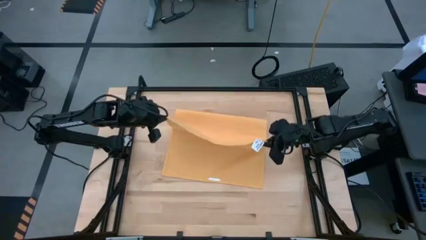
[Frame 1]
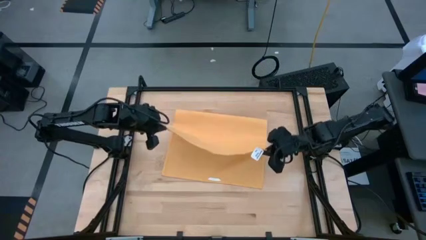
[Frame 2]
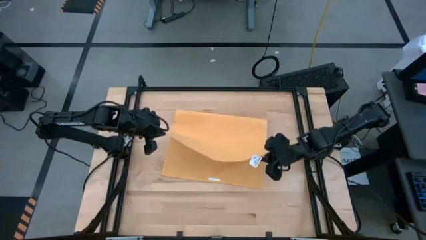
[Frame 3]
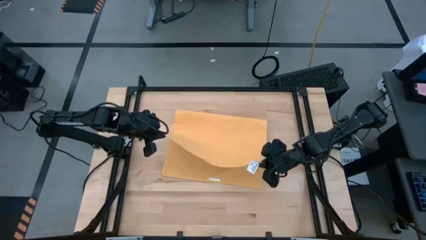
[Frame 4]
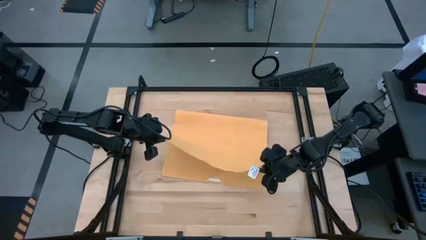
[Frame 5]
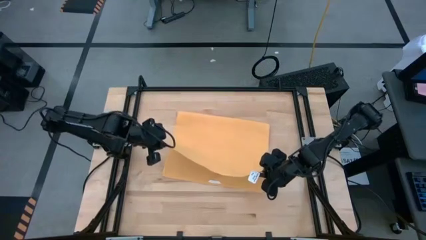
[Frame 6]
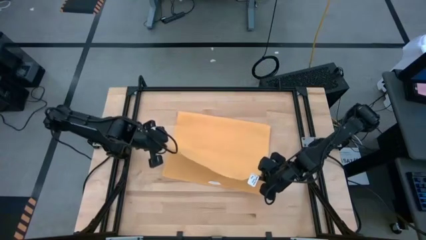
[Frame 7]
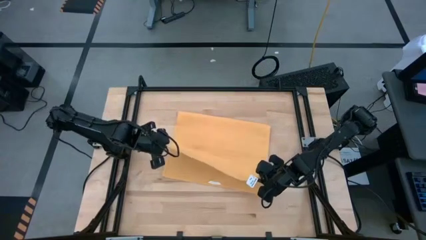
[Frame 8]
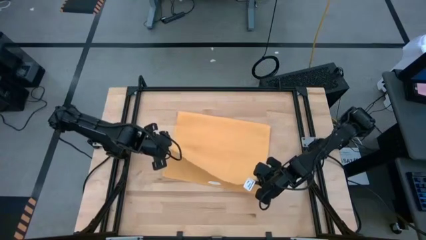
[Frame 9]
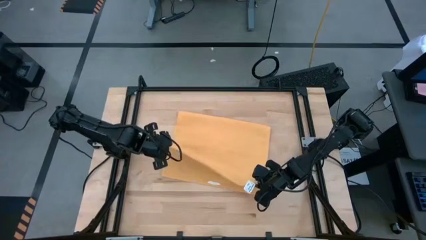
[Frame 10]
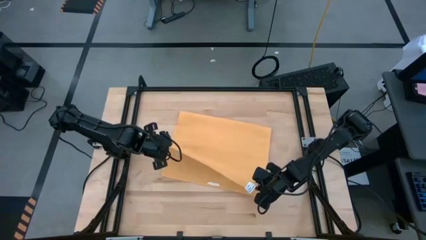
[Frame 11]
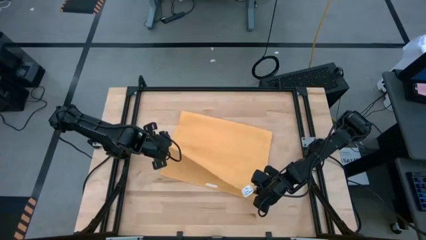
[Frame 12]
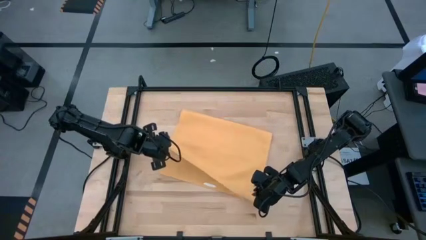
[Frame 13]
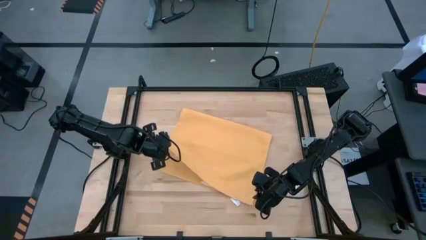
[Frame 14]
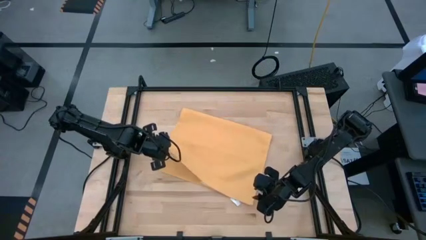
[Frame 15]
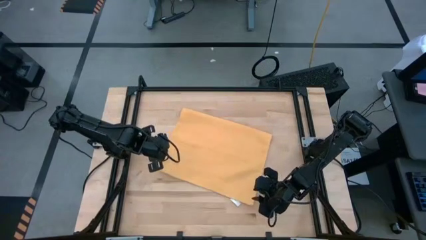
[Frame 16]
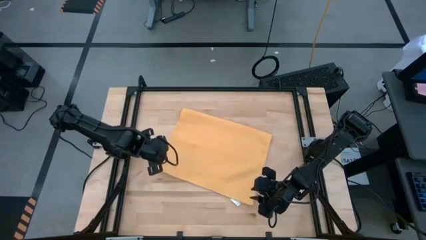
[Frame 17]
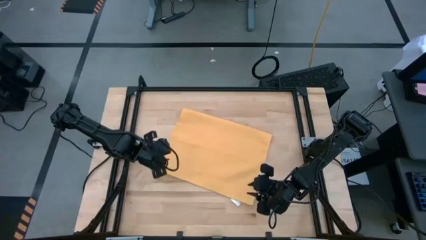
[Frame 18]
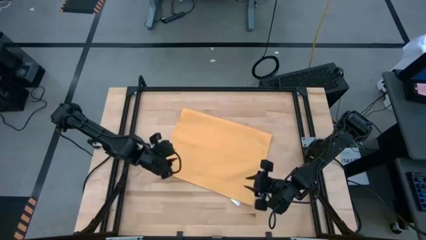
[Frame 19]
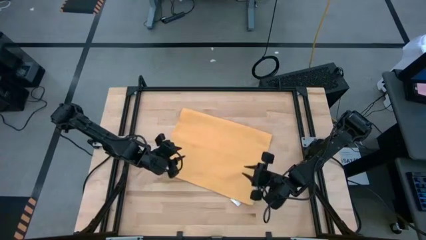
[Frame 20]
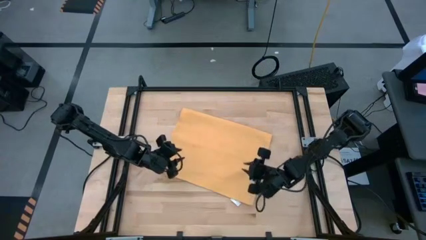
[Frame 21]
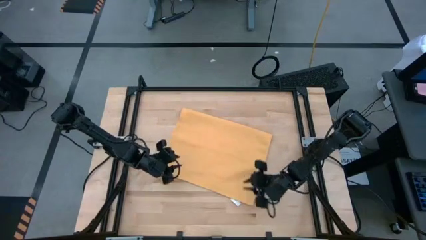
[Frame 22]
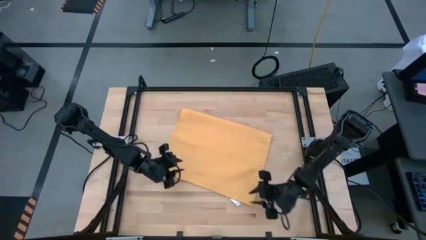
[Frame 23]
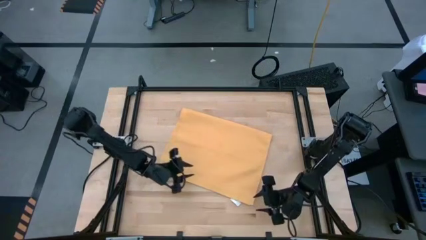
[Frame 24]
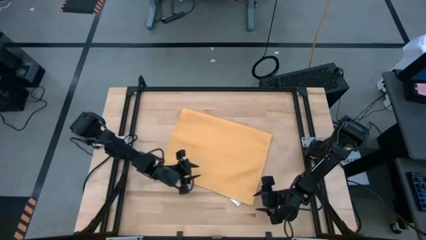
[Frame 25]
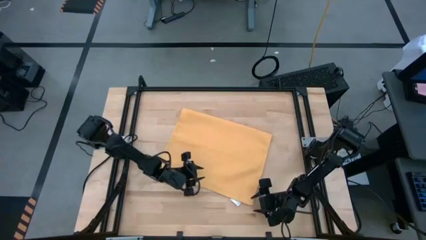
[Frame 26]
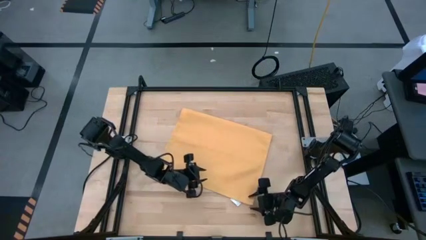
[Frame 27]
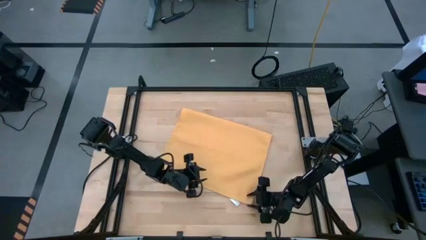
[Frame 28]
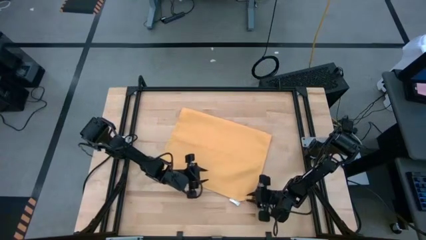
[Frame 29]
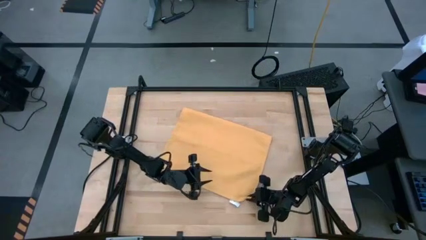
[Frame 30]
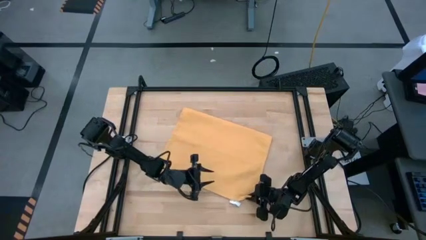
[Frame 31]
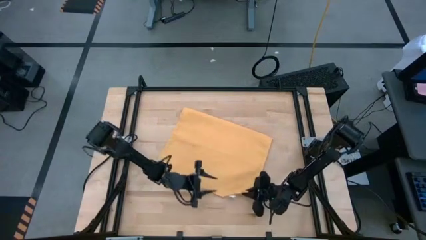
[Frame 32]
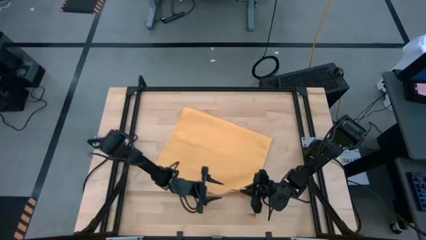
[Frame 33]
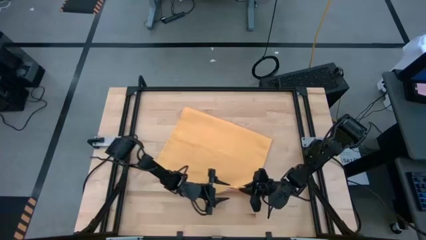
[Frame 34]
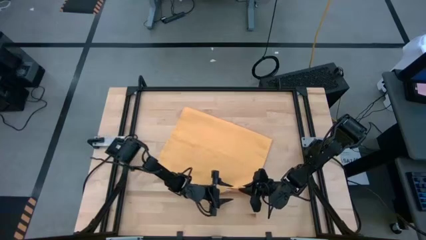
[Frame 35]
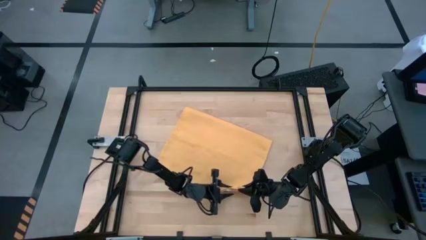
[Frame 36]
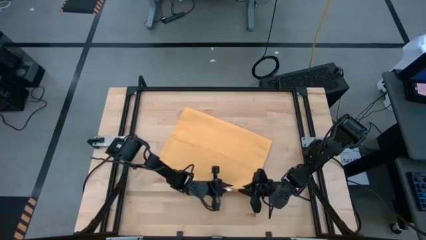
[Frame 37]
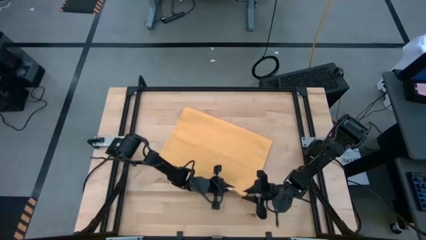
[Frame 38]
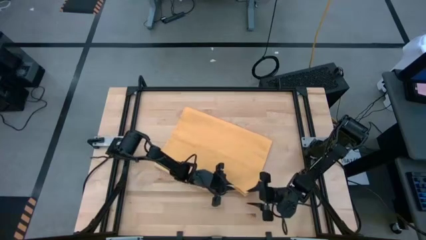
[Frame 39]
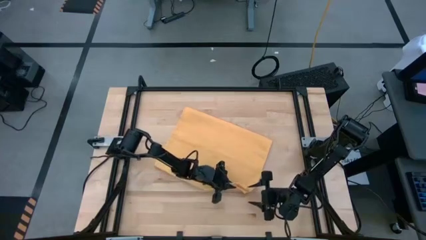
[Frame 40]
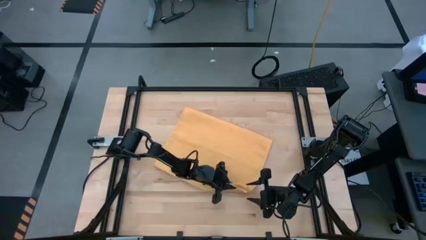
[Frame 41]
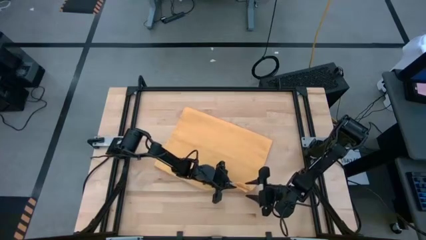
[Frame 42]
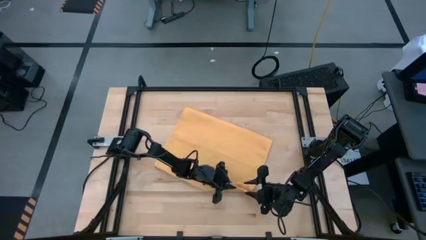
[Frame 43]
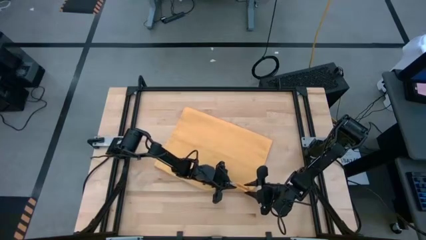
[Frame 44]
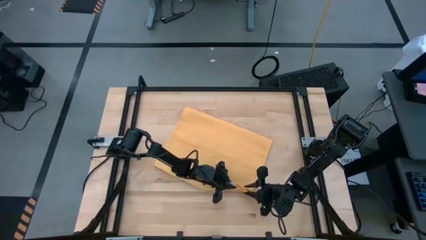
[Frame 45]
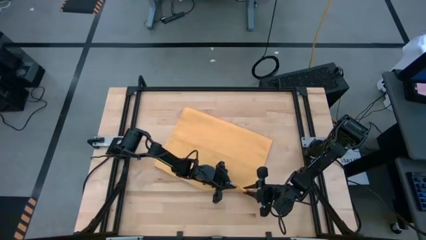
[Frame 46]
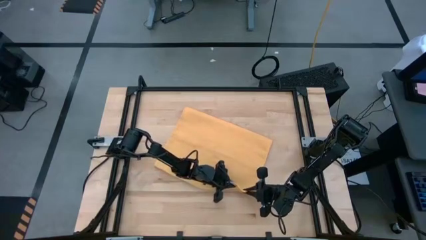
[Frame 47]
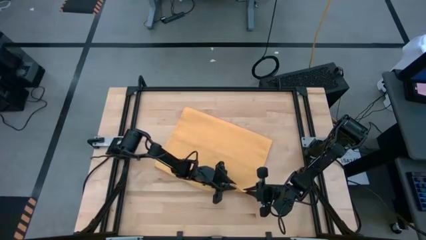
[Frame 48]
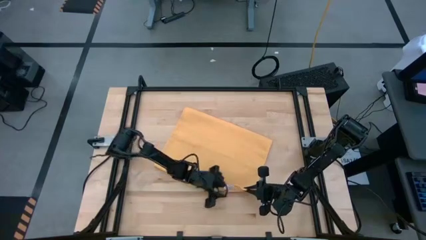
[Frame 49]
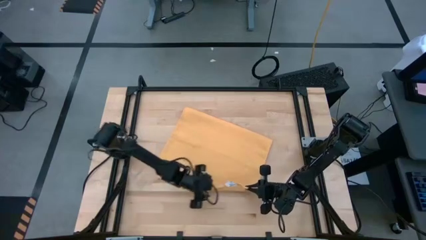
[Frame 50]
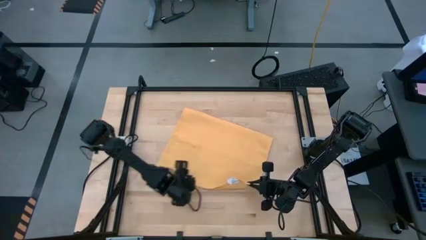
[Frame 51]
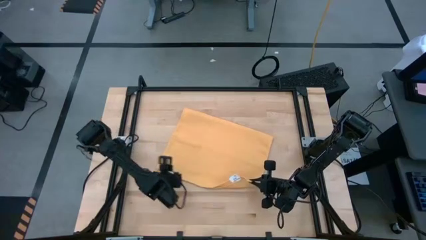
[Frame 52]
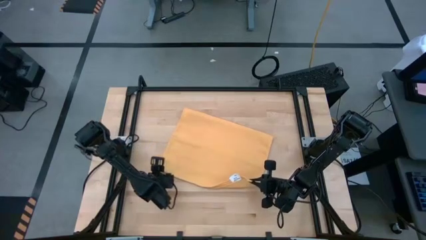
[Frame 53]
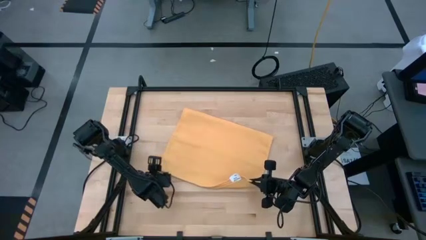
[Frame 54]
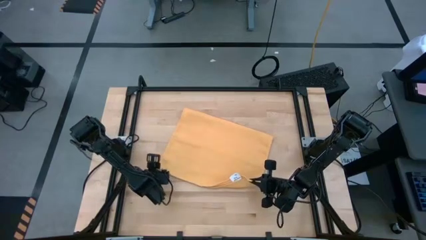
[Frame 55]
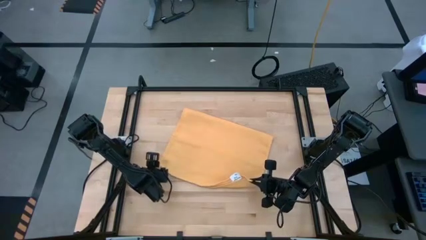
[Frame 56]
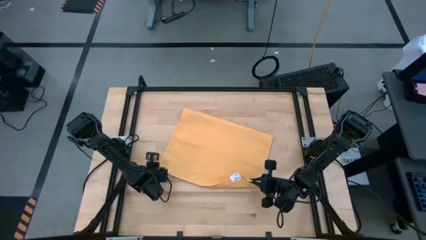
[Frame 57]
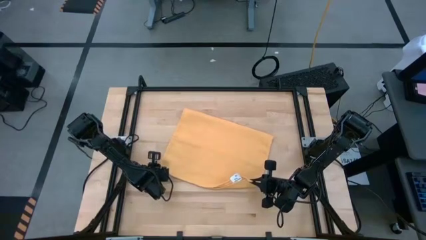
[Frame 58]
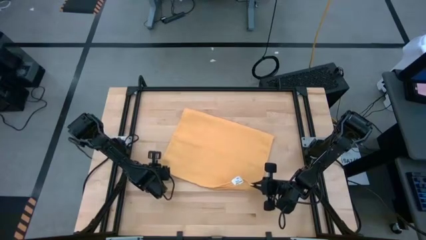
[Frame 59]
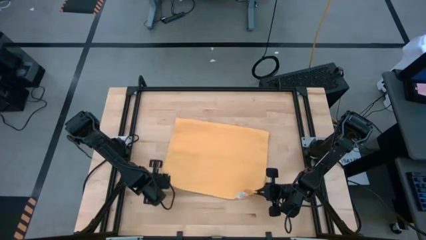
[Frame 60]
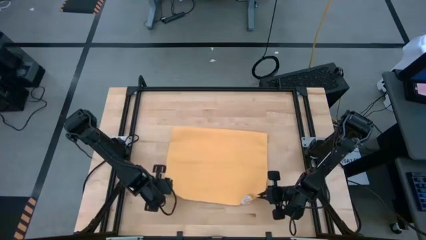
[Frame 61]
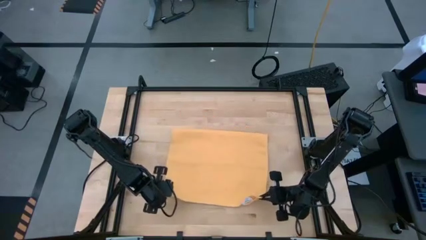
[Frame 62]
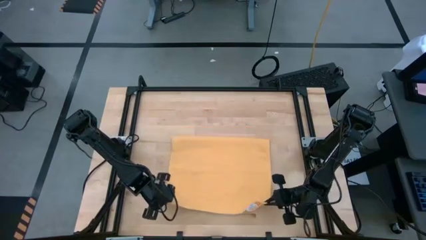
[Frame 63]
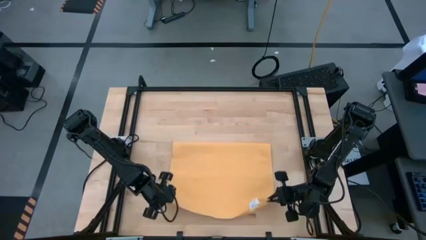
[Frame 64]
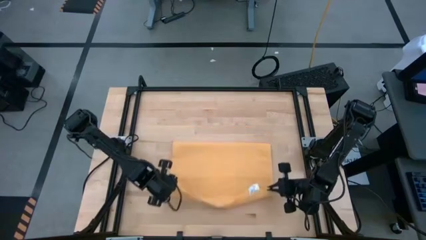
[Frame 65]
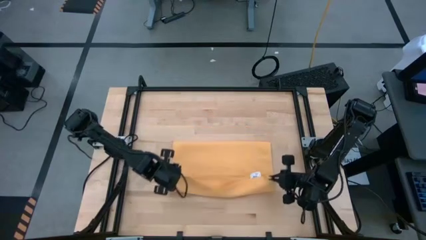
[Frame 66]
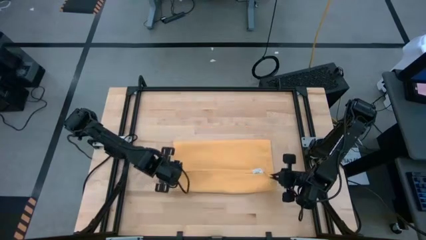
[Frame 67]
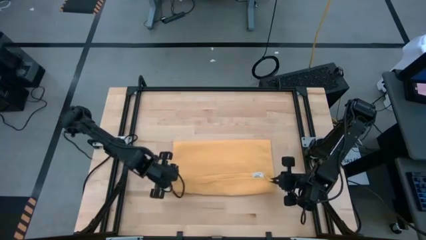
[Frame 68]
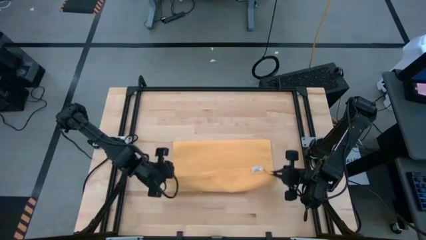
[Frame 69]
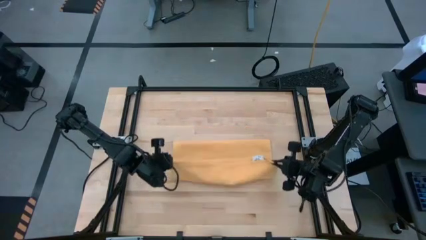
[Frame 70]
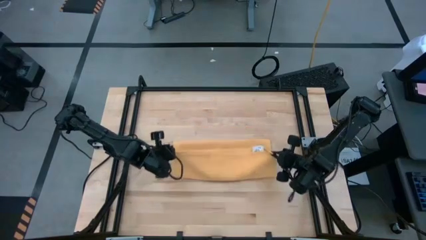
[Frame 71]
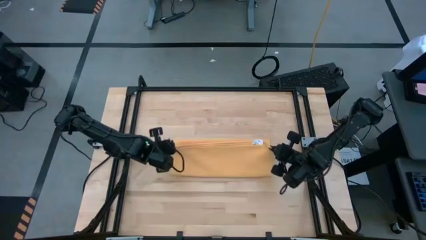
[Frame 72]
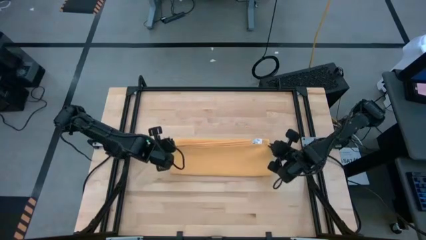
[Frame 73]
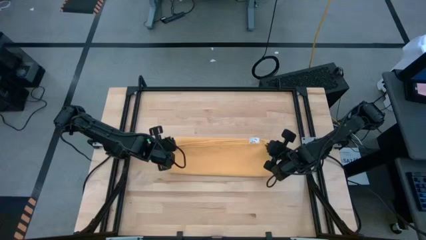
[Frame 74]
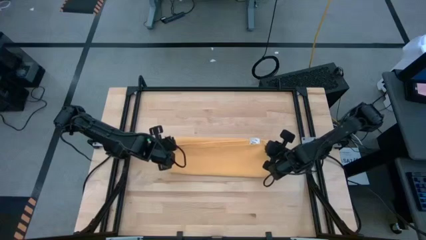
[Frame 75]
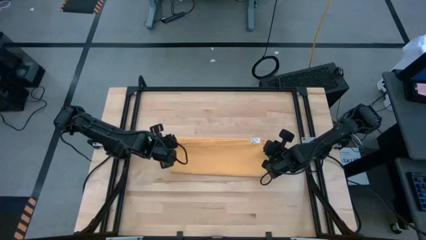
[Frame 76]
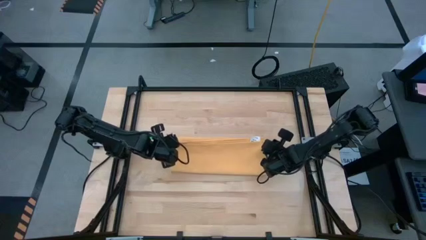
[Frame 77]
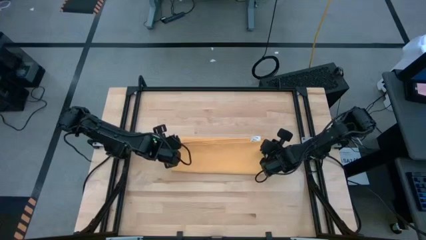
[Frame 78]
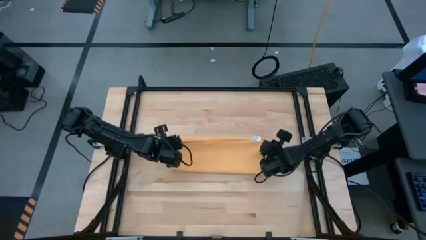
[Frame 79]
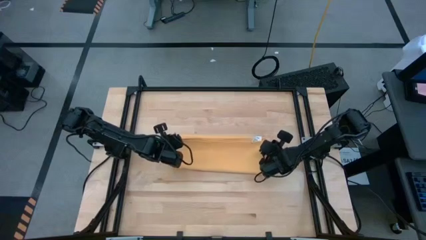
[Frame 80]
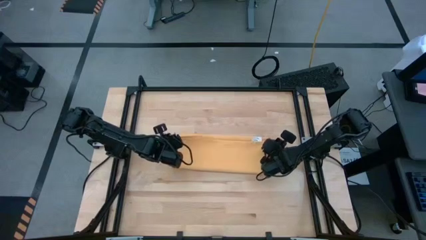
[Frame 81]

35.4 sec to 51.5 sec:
Task: Roll towel
Fold the yellow towel
